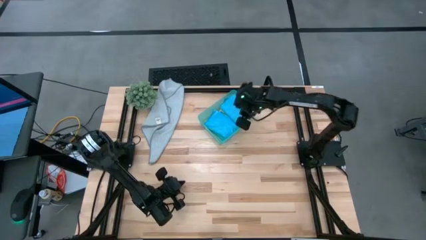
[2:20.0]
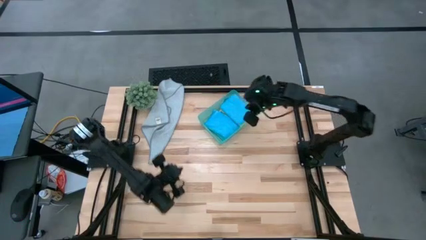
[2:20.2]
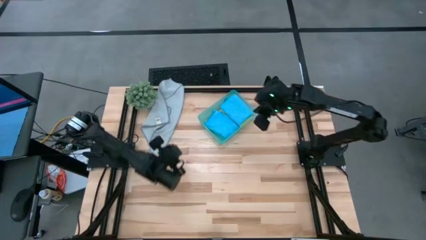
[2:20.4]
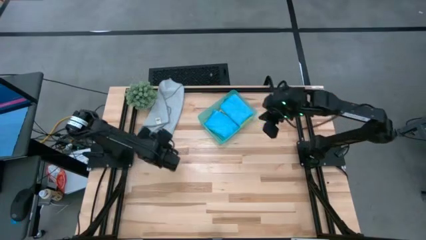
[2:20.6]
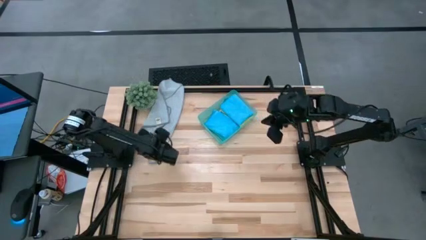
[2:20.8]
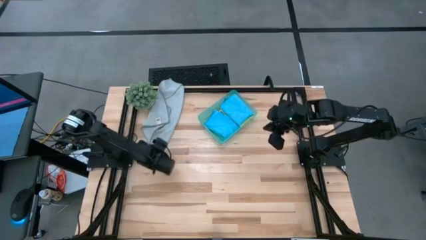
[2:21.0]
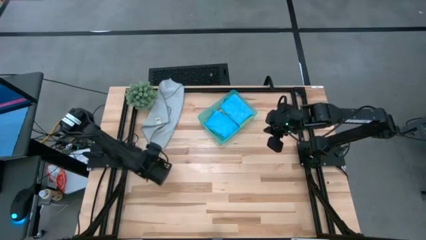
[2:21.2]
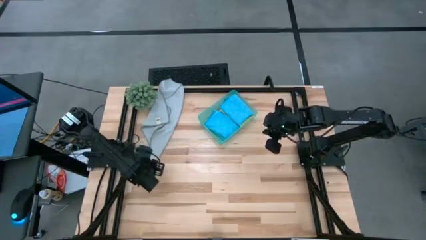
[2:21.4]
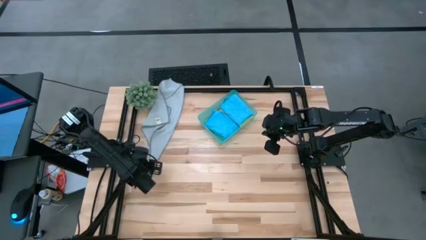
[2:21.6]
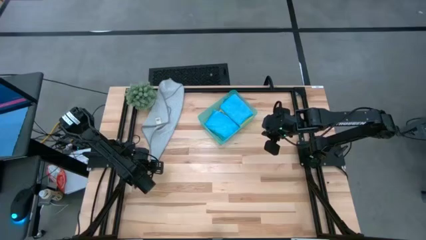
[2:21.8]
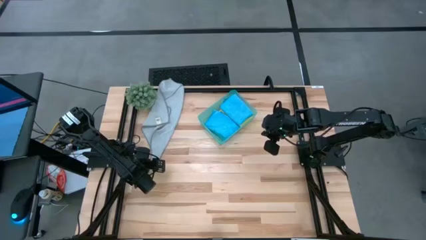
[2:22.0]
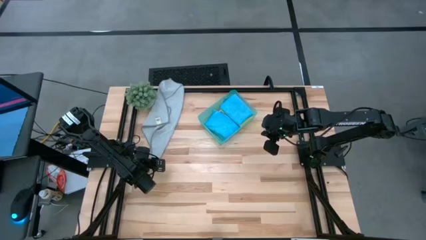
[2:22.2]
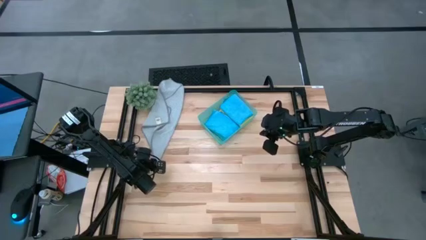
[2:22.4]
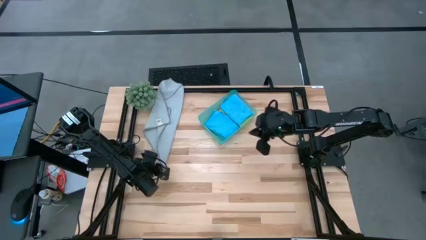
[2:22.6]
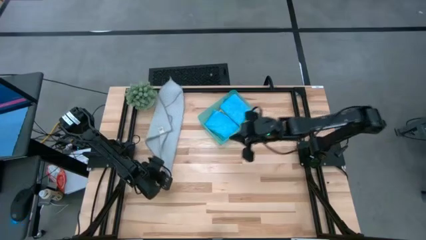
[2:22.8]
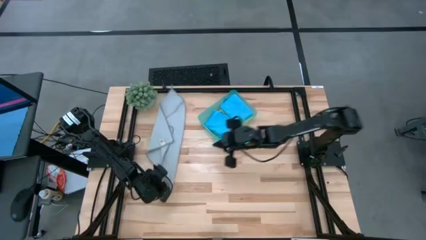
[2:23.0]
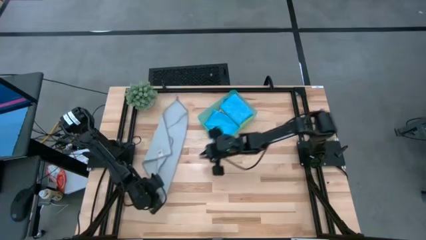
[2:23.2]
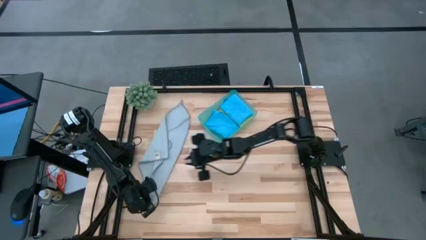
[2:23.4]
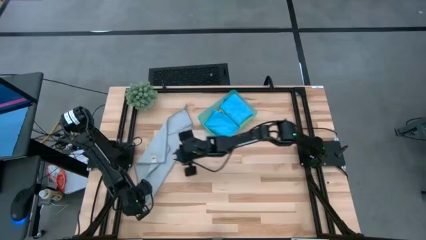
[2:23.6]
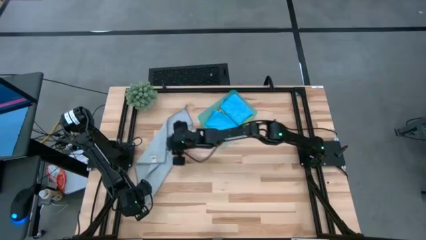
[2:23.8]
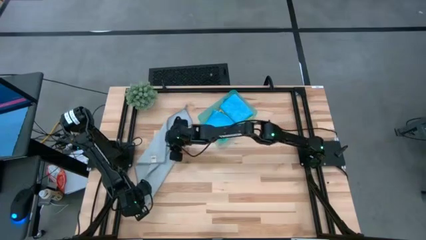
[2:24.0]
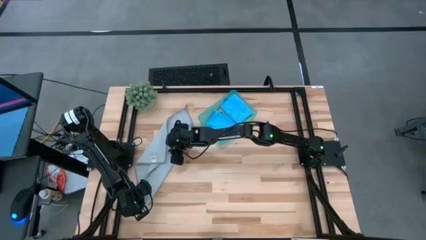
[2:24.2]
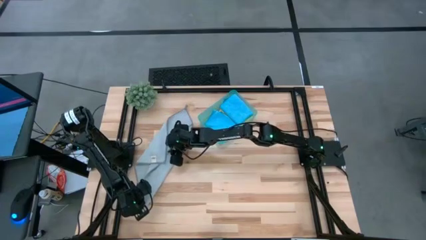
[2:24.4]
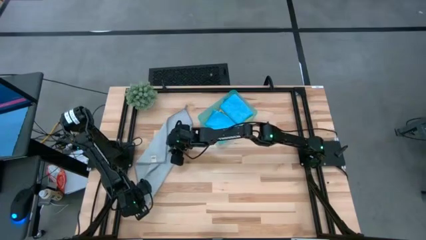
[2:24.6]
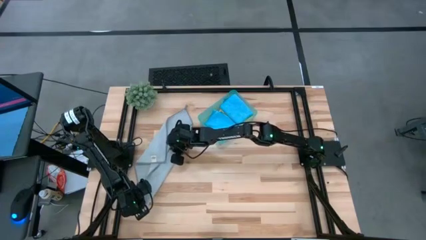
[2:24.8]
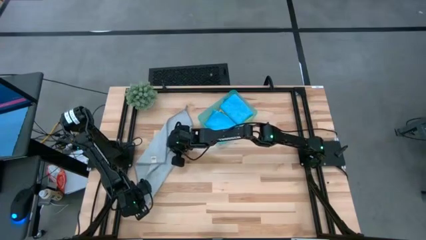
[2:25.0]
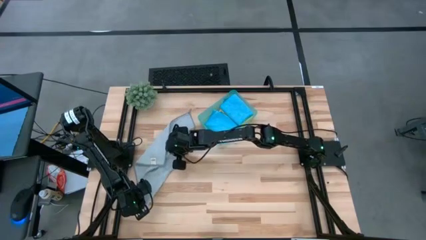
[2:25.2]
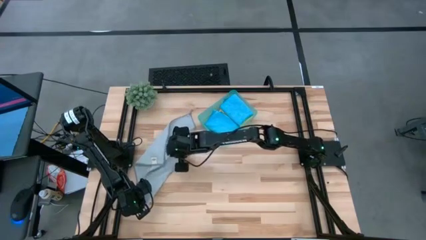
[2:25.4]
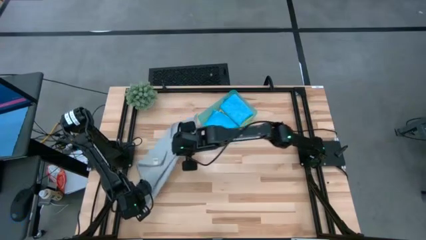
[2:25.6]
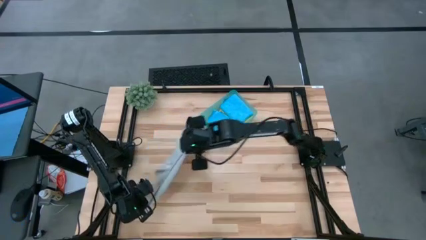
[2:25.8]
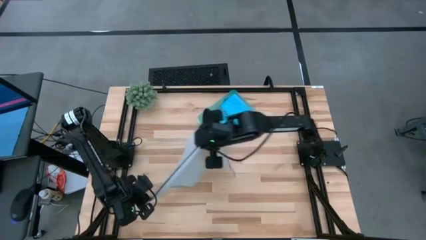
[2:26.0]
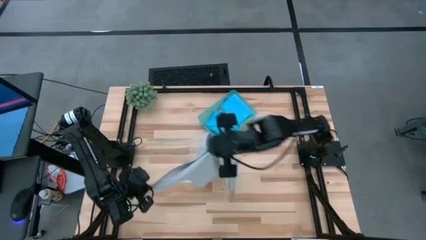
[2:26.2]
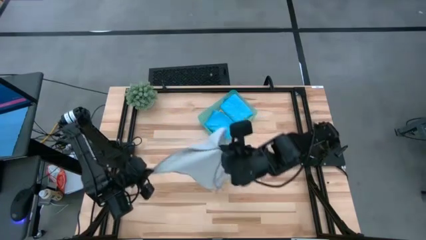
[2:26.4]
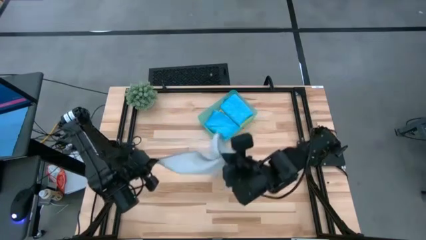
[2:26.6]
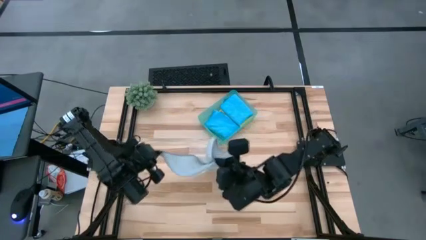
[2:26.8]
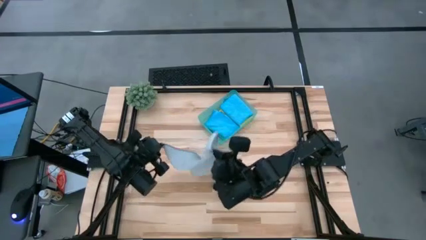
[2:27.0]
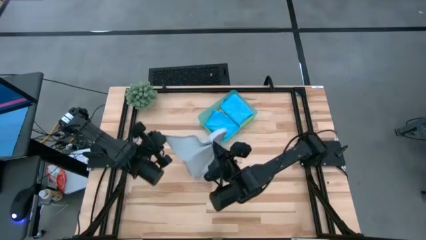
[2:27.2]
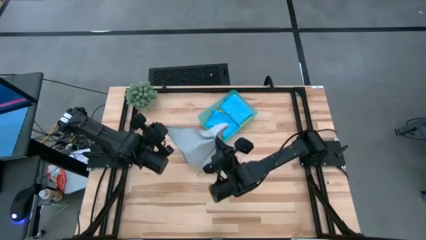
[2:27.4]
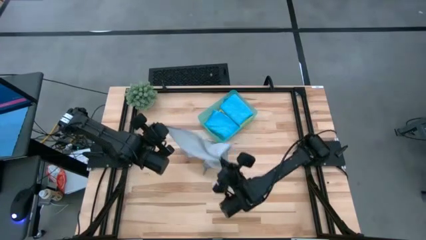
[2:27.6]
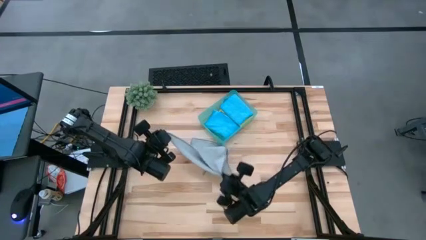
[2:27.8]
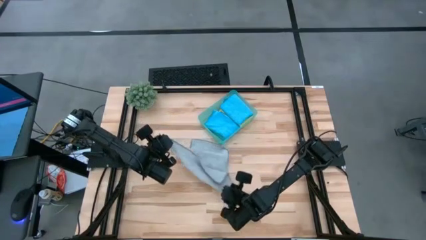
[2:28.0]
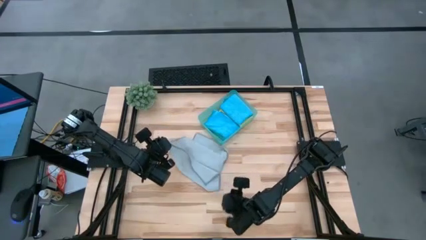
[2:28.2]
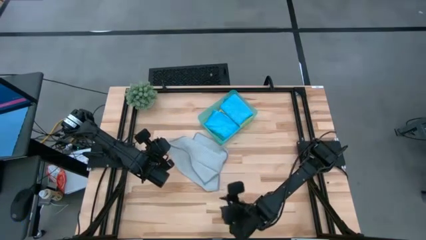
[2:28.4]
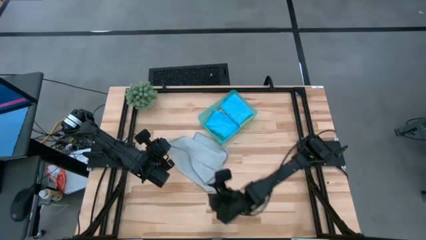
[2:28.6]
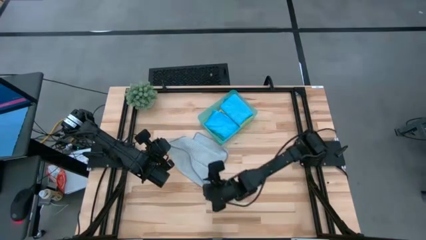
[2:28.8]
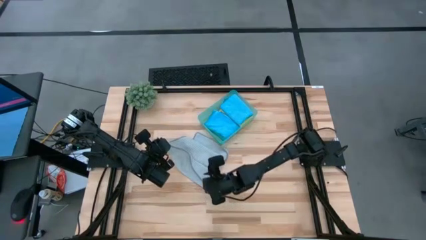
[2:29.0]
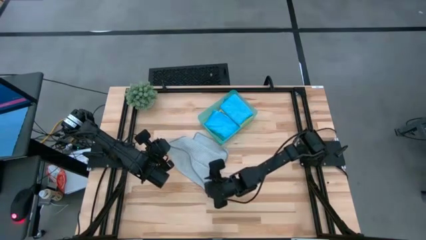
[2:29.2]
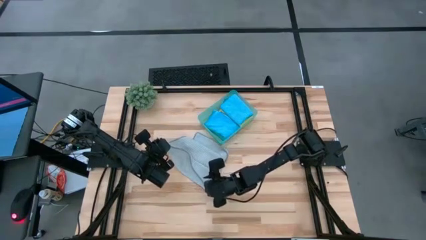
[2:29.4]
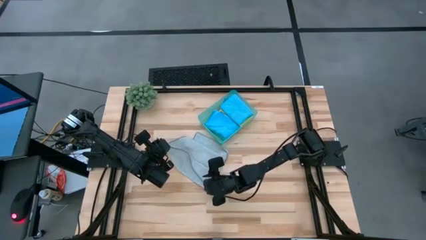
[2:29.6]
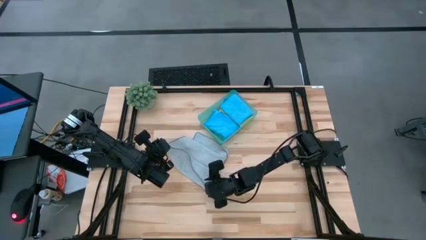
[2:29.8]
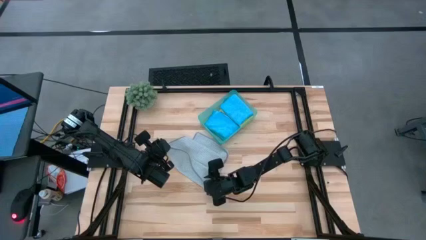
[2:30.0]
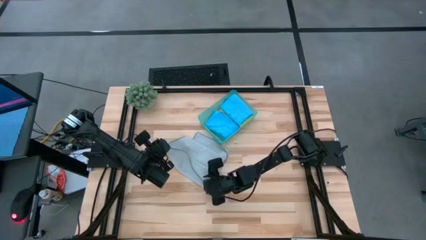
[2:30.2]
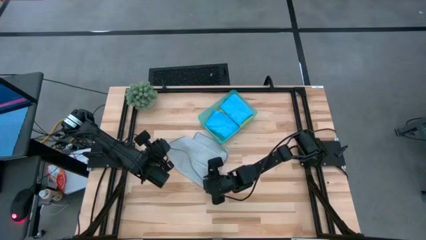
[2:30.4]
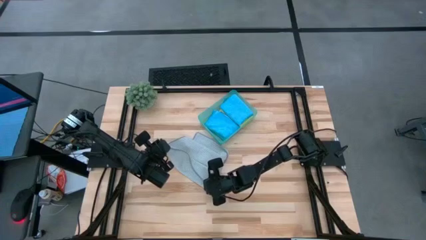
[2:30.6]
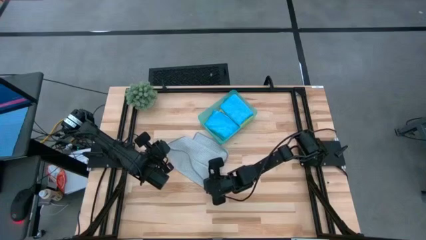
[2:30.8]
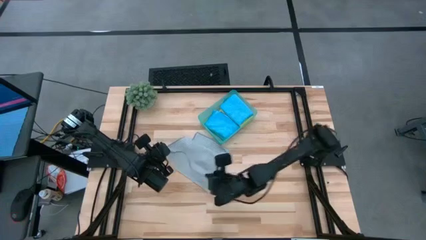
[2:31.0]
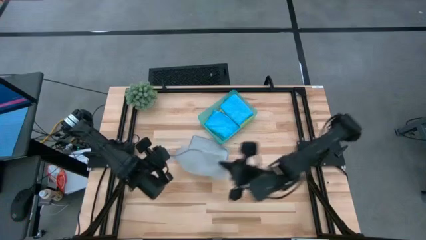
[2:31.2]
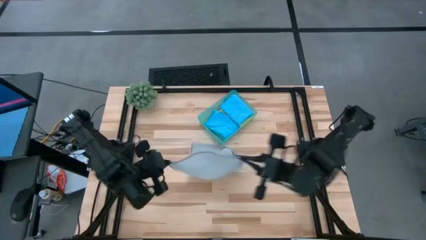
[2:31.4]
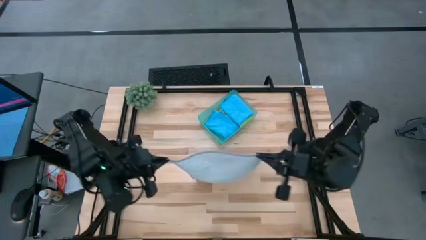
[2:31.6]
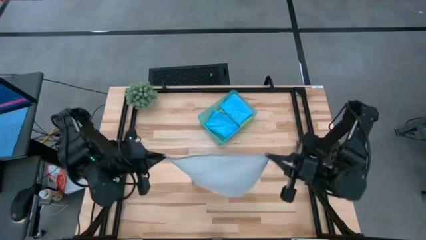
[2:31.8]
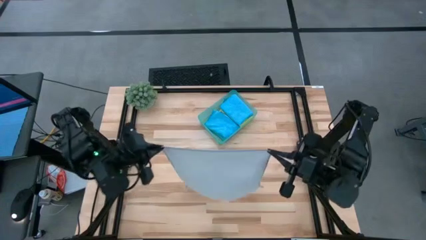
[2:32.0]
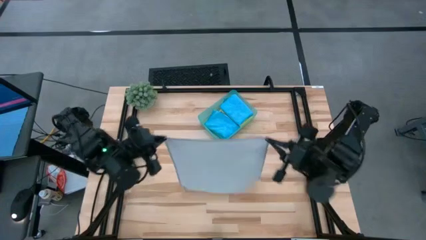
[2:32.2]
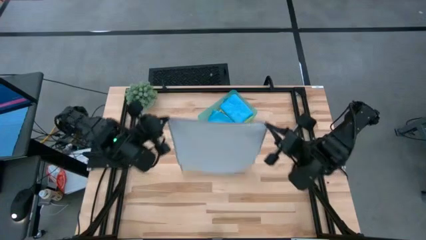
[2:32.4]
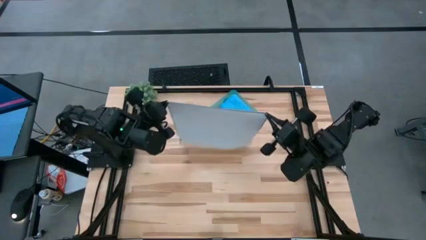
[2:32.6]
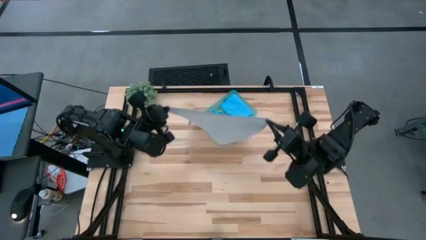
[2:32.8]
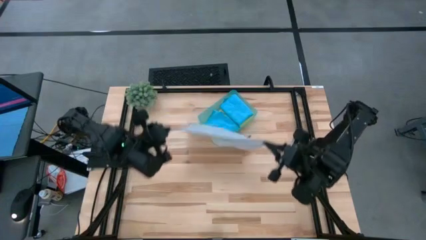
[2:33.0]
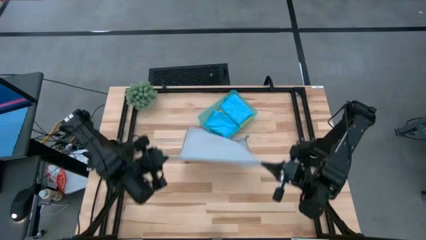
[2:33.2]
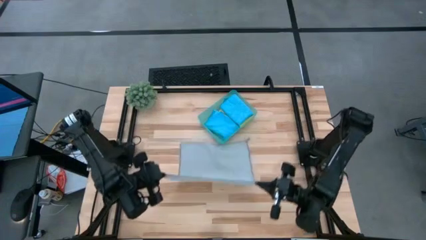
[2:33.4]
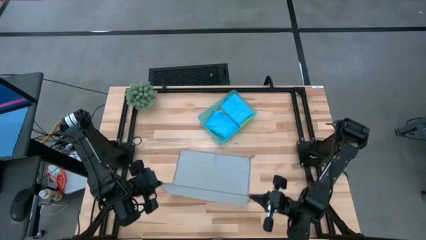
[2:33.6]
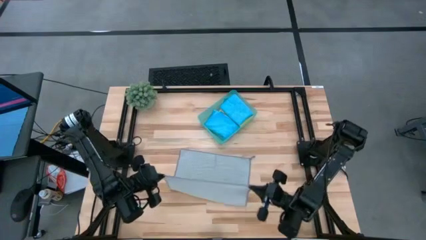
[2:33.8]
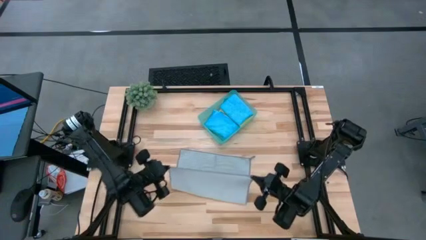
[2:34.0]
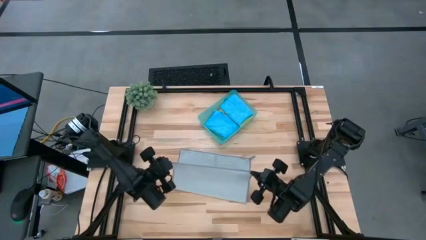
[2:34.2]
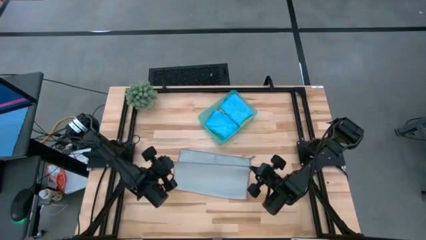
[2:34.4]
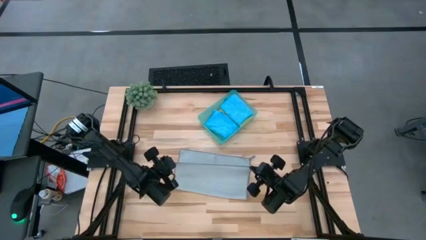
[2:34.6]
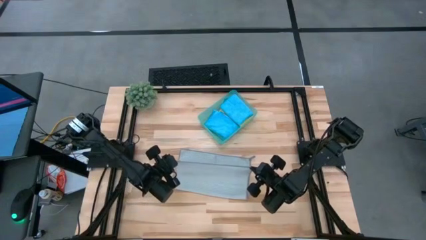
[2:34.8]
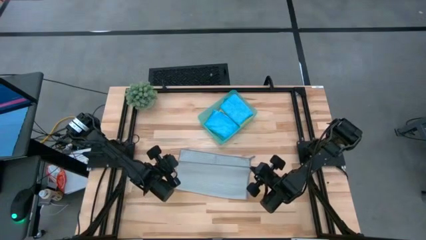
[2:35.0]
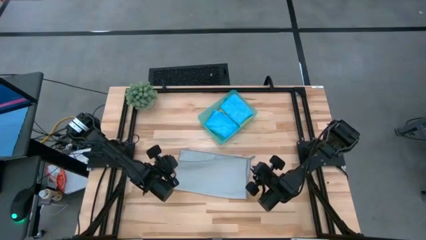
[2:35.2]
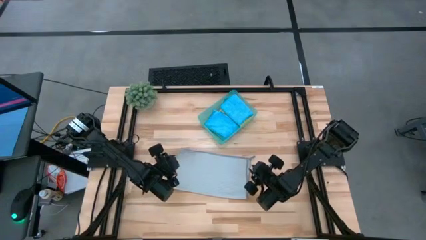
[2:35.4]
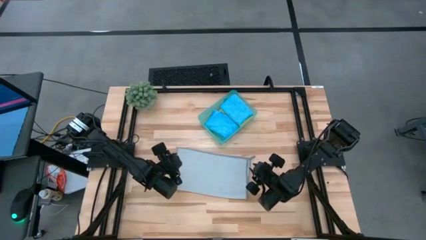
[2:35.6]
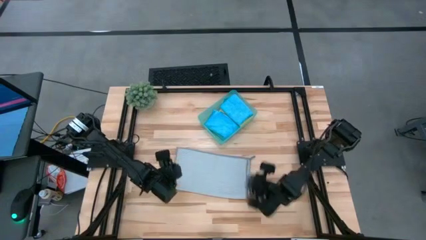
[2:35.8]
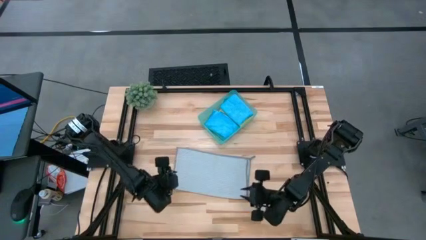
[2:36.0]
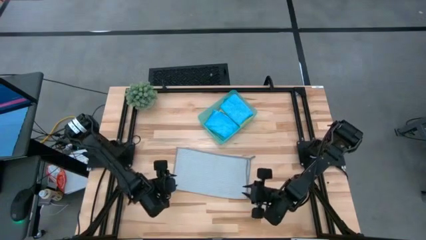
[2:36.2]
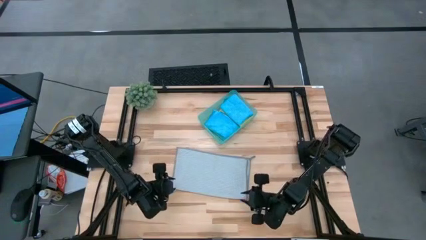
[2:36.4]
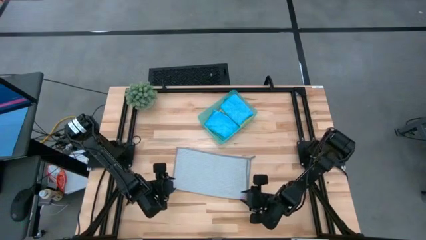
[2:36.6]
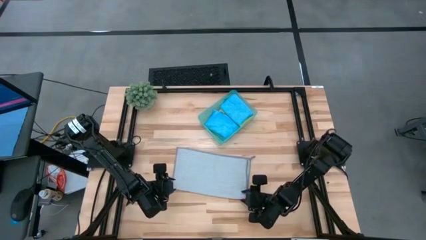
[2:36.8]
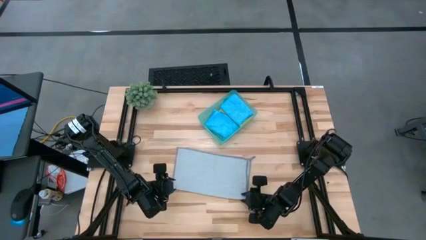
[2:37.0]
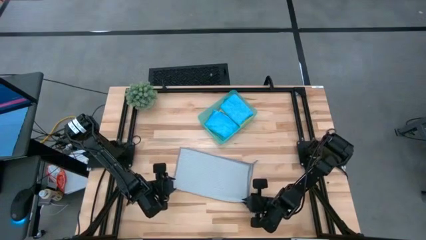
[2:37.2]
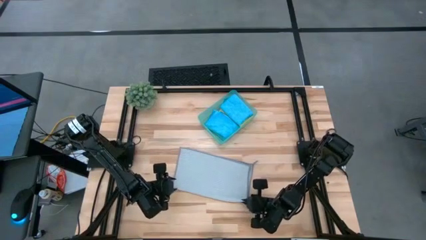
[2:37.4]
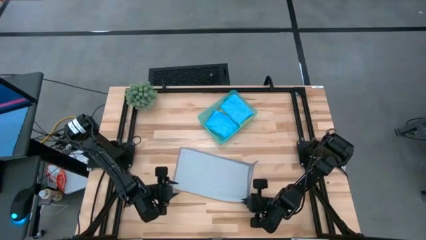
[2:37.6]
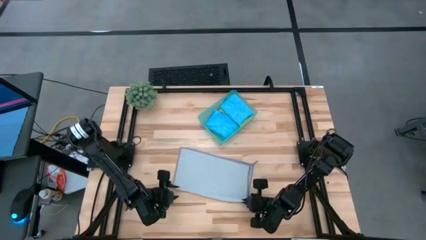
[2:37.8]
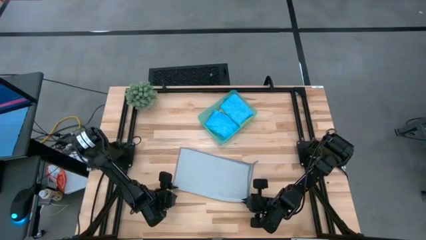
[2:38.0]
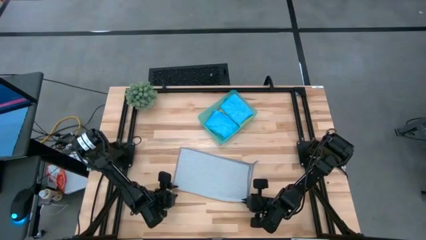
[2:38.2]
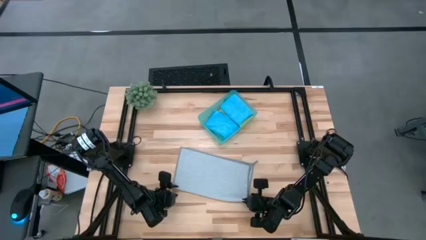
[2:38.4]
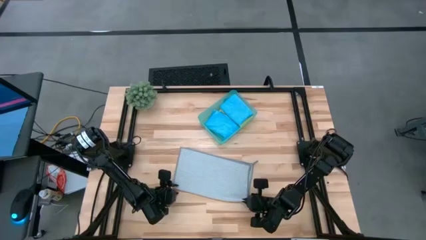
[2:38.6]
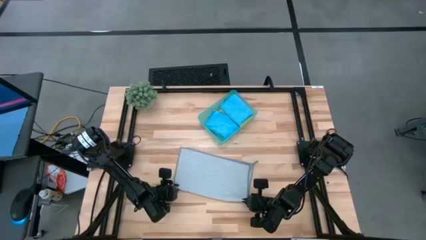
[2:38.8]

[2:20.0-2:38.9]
Task: Fold microfiber towels
Fold the gray microfiber towel
